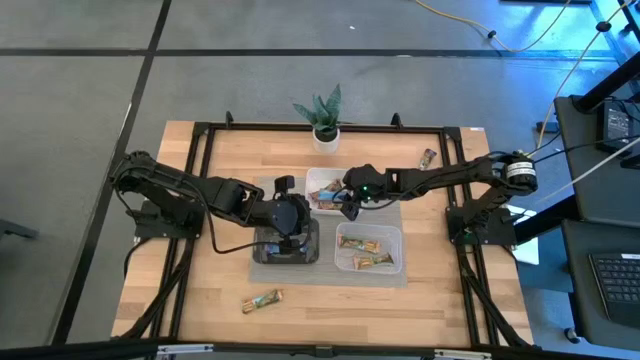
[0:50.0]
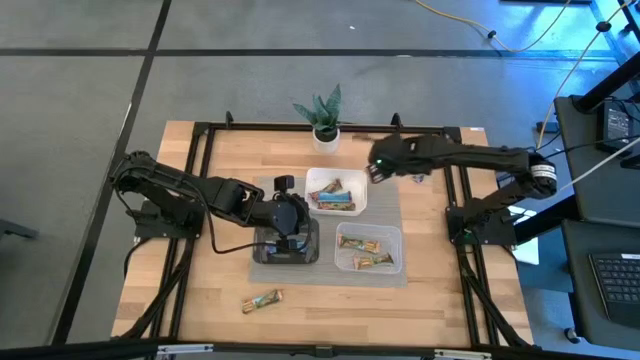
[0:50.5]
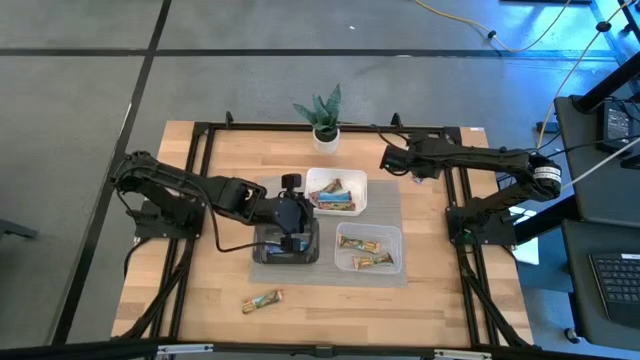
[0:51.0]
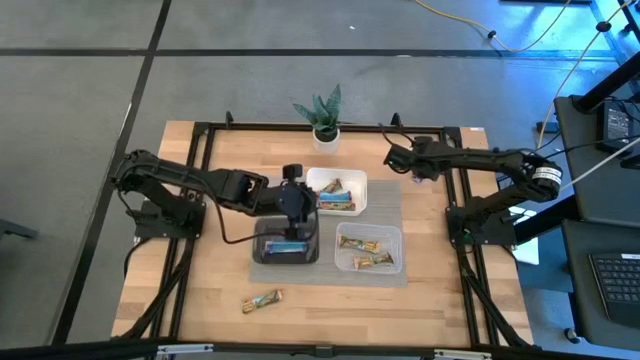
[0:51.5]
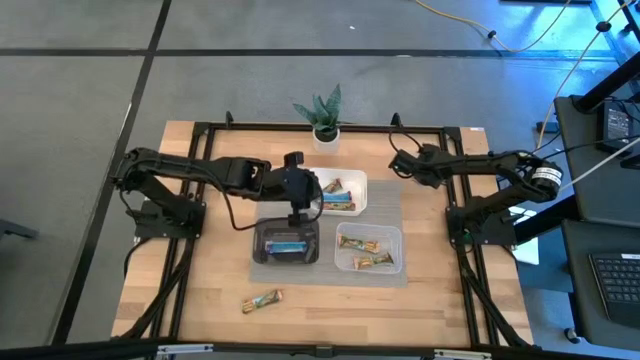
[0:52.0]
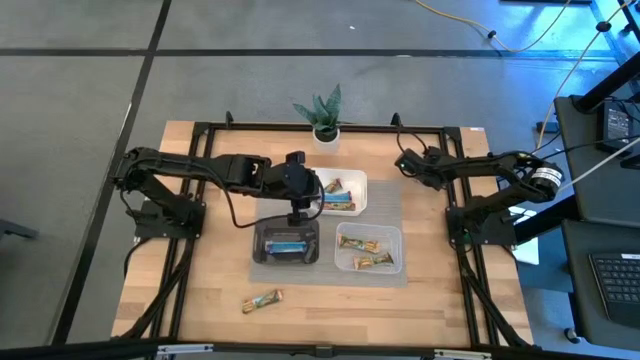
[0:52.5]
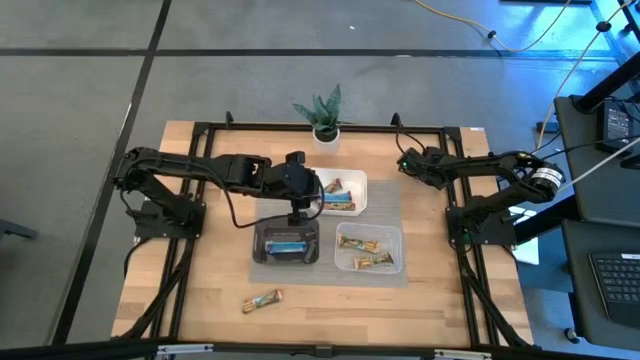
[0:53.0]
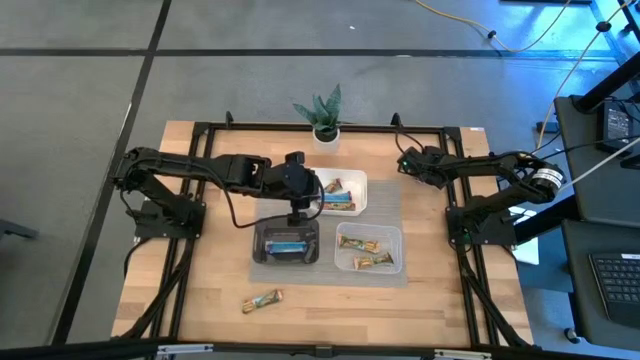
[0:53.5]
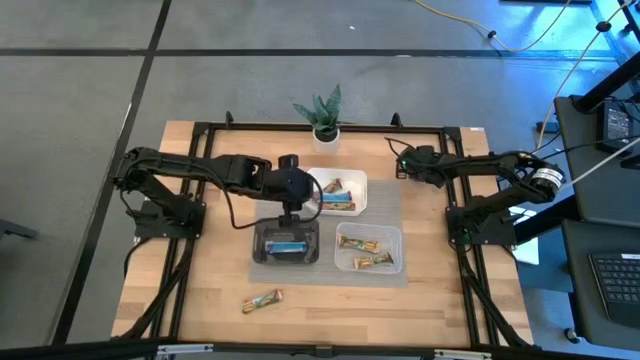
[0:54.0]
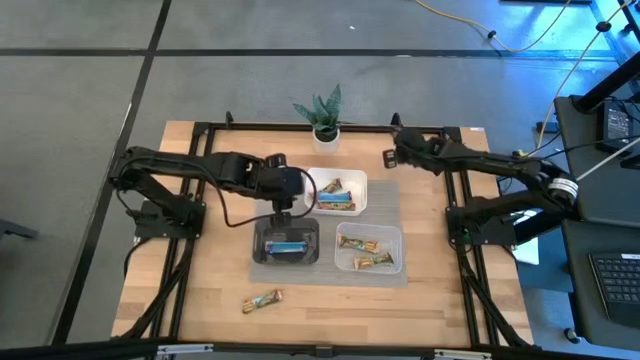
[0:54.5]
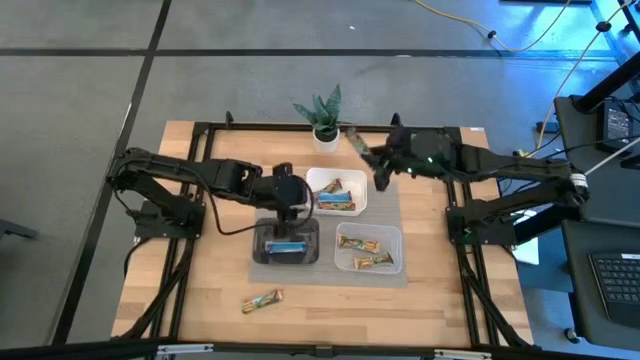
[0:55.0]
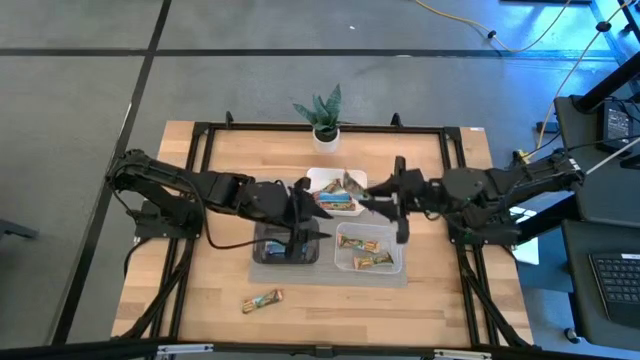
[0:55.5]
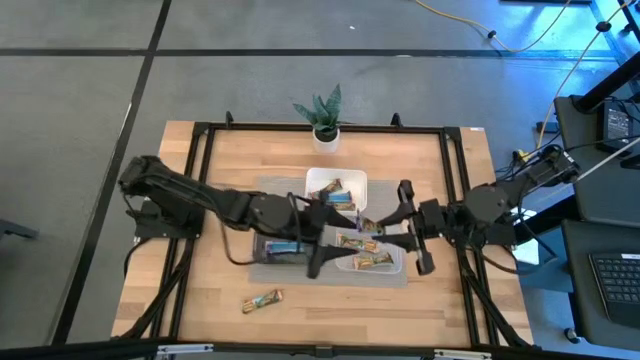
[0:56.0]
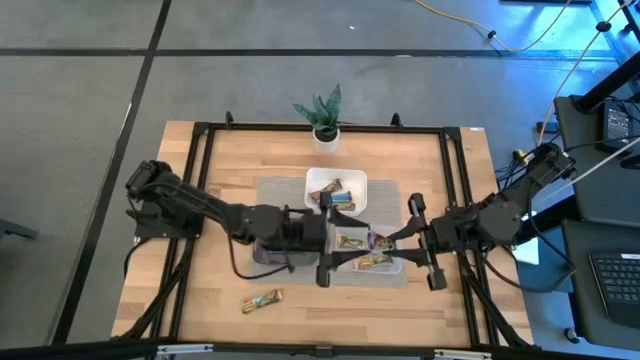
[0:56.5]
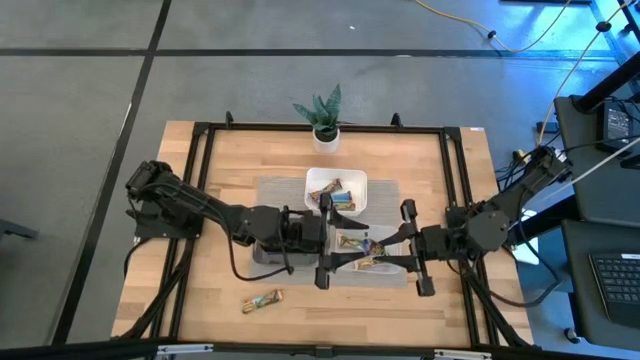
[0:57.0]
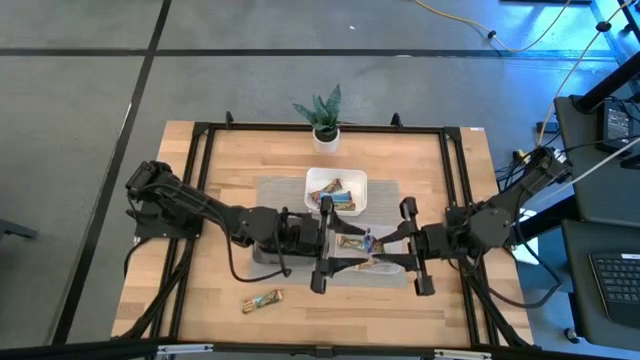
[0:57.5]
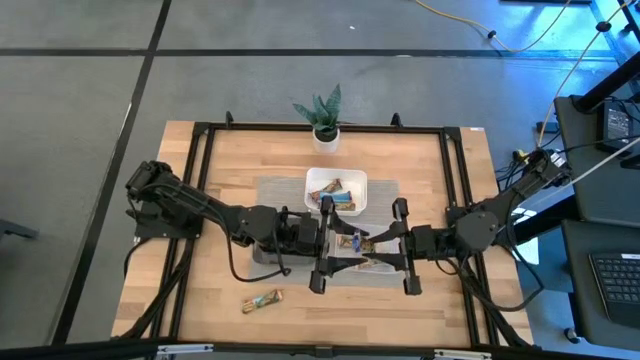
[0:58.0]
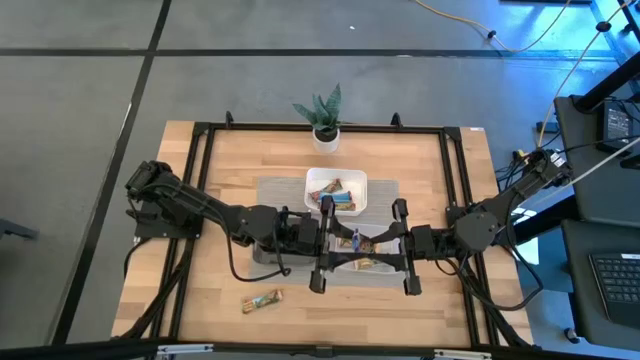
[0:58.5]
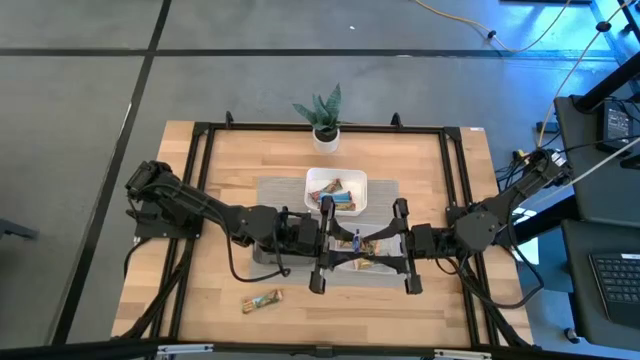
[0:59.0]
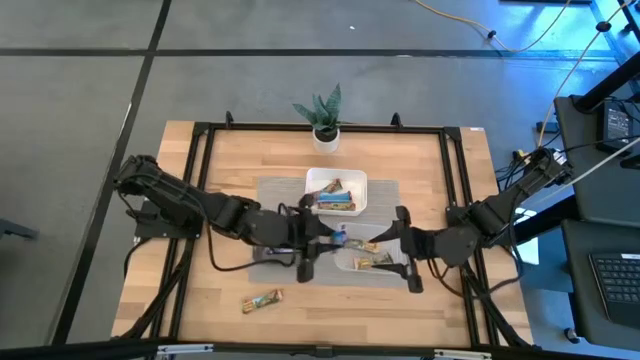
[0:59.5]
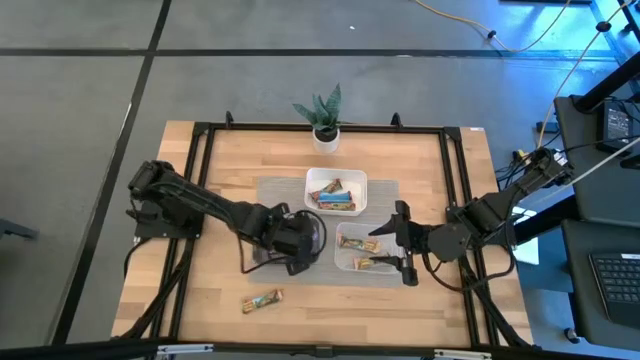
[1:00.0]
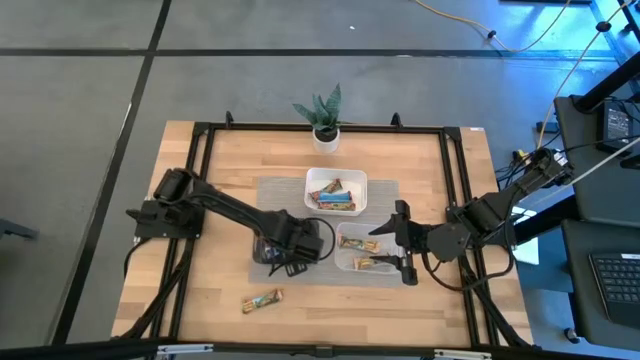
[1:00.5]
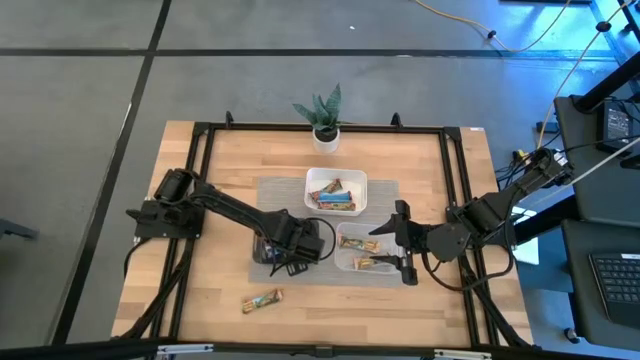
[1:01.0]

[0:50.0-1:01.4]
Task: Pick and place Granola Bars by type
Put the blue granola bar into the black bin

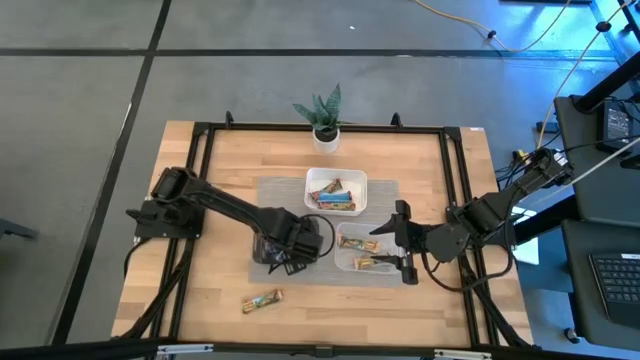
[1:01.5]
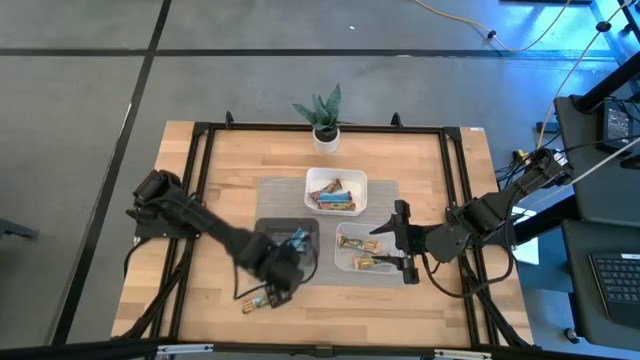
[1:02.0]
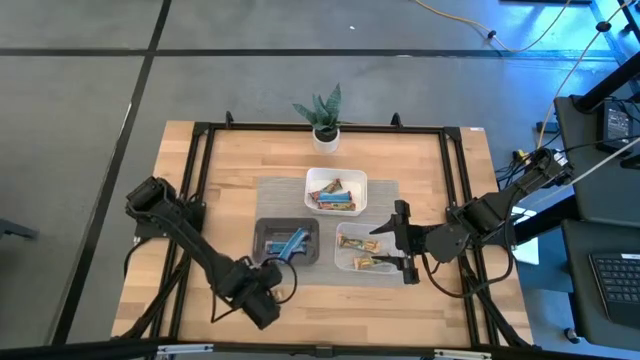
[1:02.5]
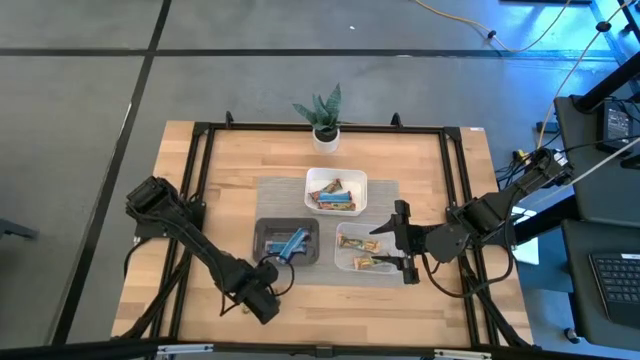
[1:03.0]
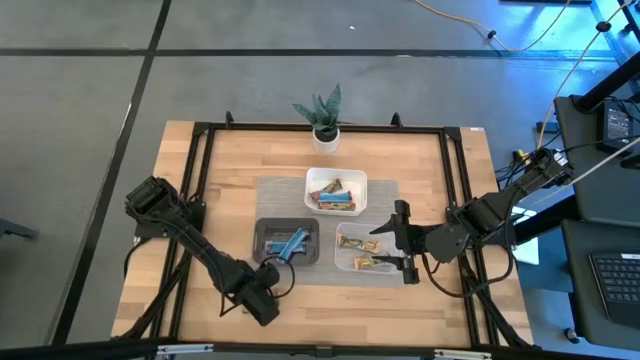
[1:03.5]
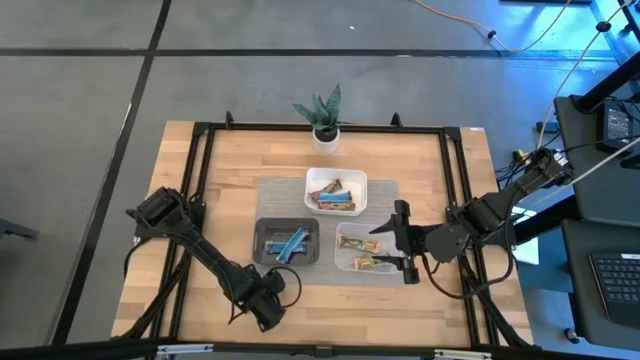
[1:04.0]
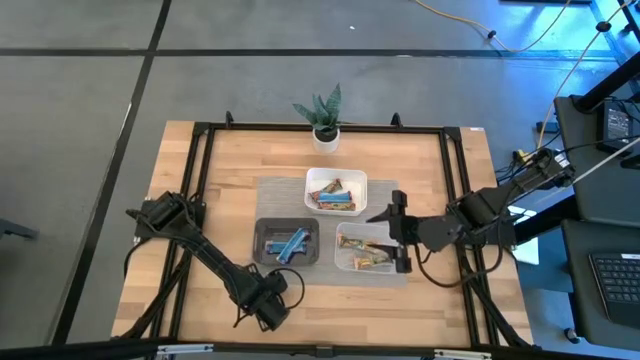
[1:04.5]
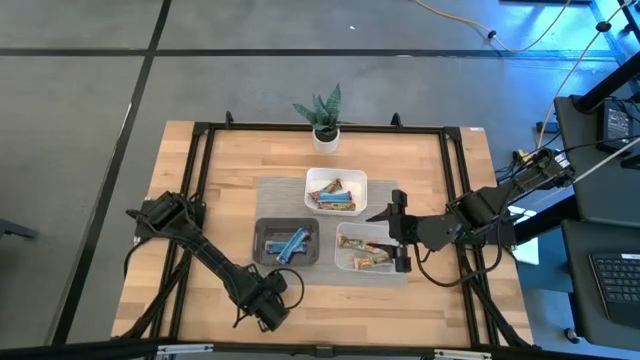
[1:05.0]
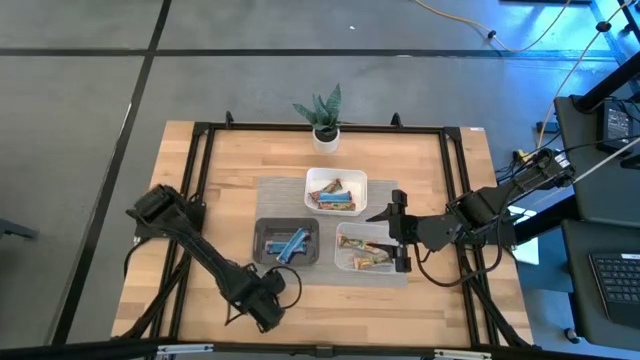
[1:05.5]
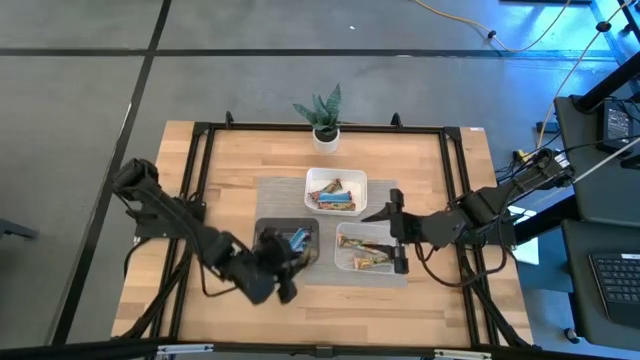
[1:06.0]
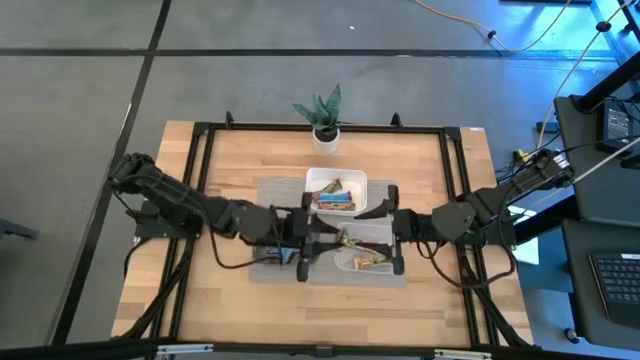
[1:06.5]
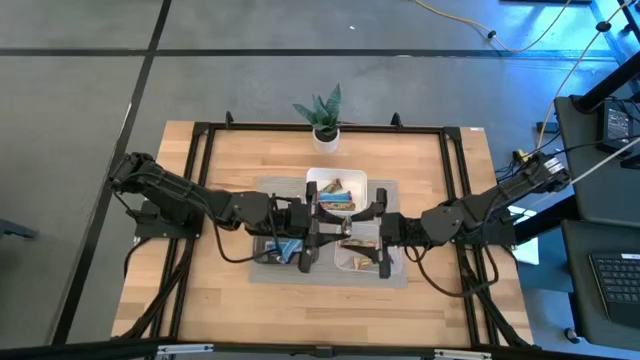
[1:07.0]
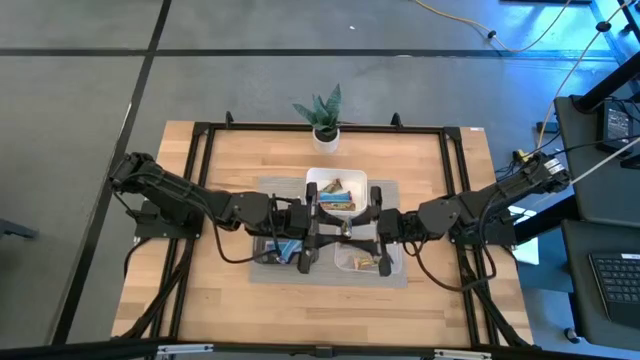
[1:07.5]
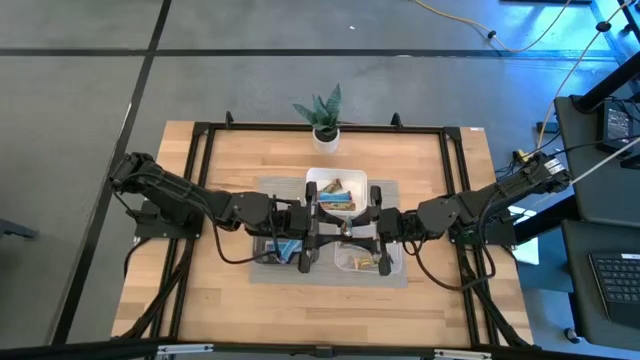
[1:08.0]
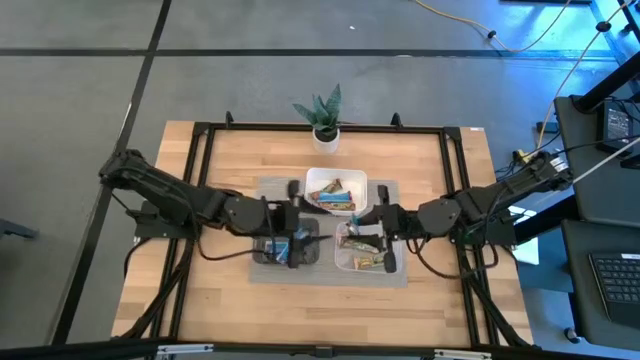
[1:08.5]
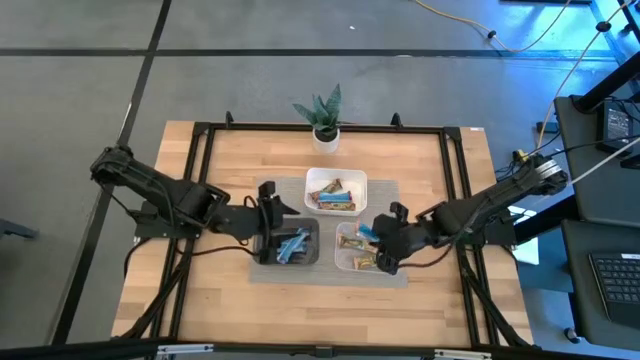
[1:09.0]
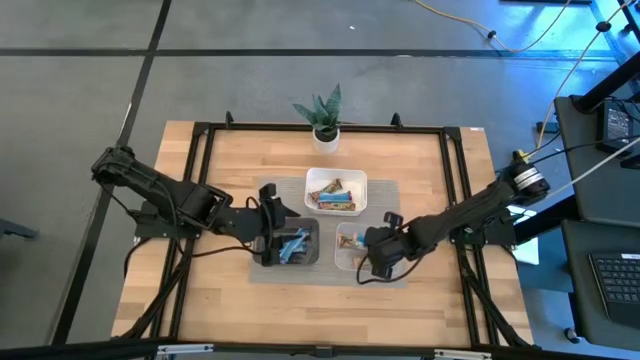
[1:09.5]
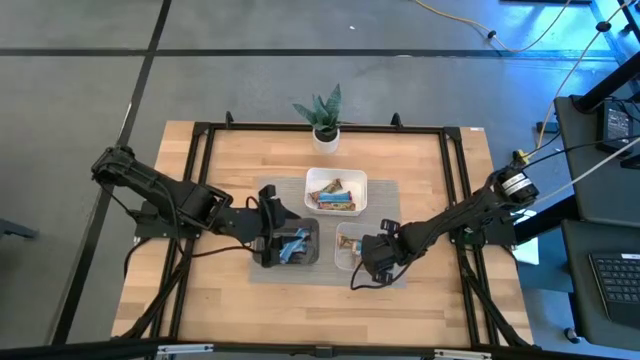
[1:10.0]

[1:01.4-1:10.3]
Put the yellow granola bar into the transparent bin

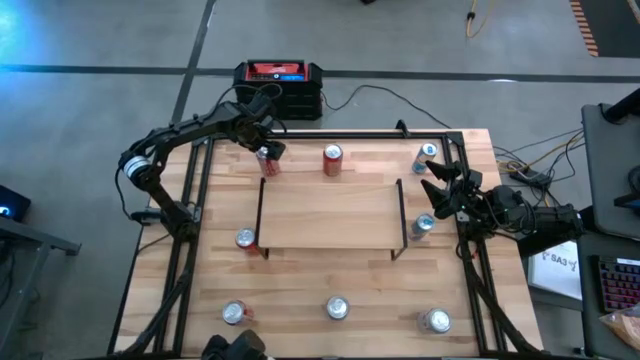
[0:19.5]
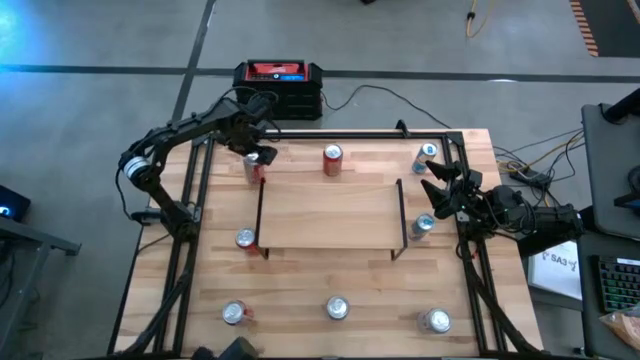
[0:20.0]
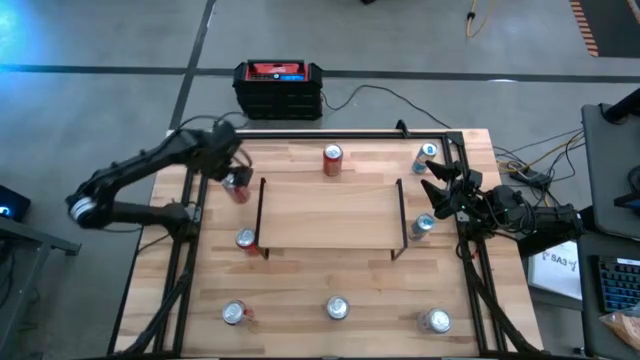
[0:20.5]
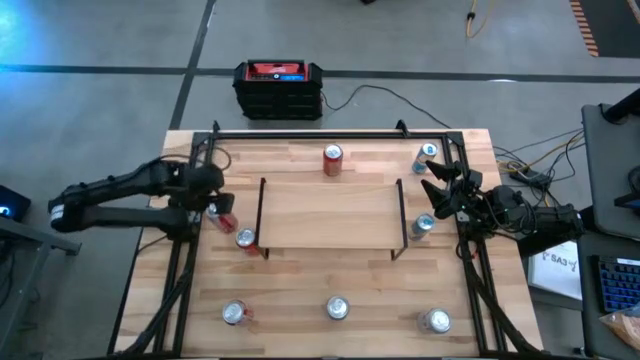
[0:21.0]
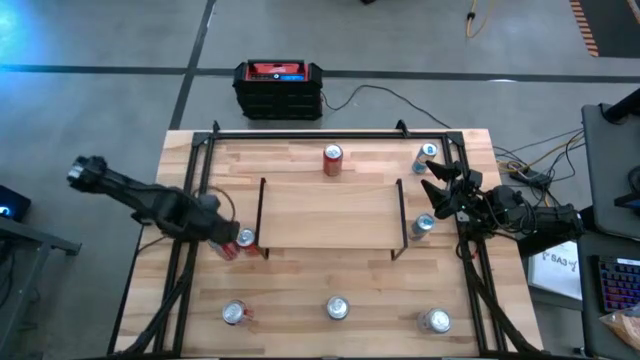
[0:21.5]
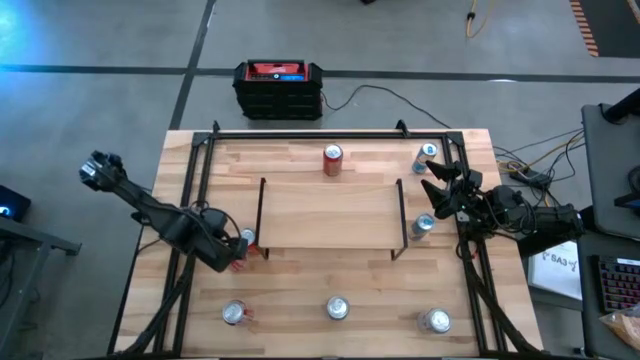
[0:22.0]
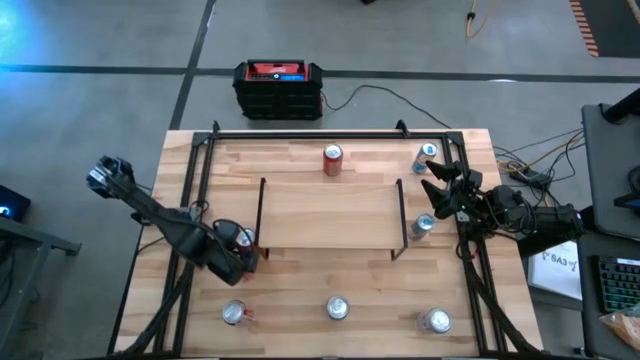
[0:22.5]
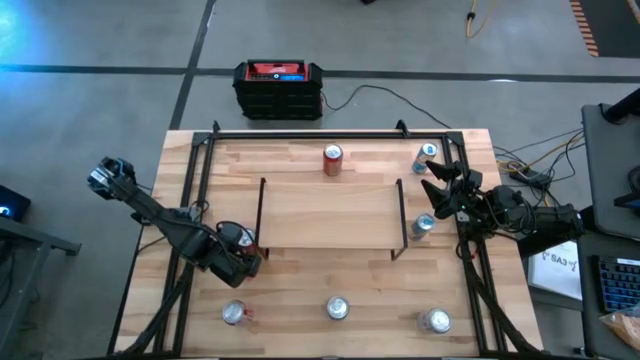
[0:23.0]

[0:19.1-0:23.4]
Task: Place canned beverage on shelf
Move the top red white soda to the middle left of the table
